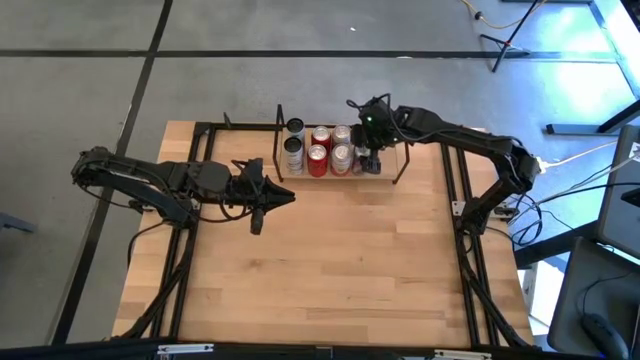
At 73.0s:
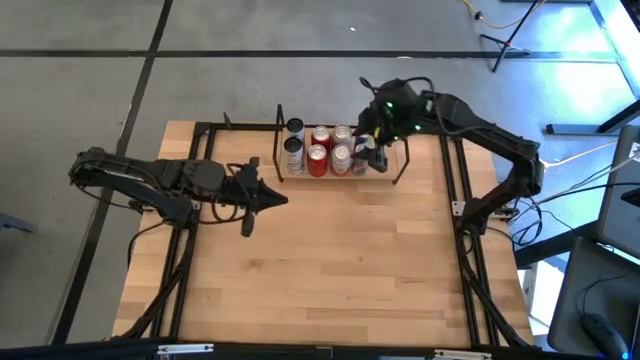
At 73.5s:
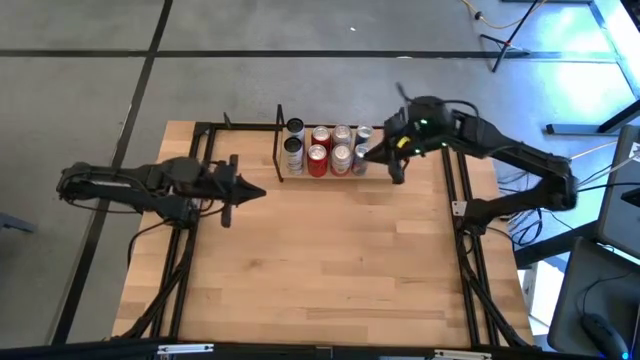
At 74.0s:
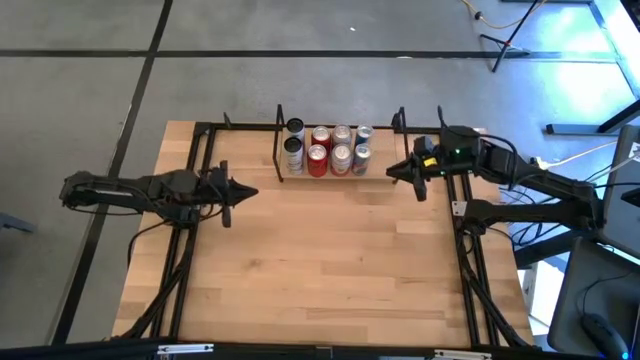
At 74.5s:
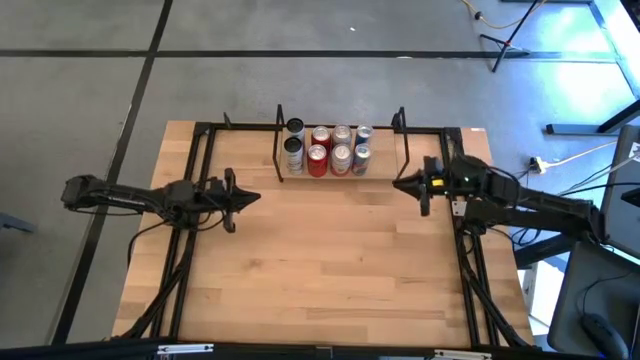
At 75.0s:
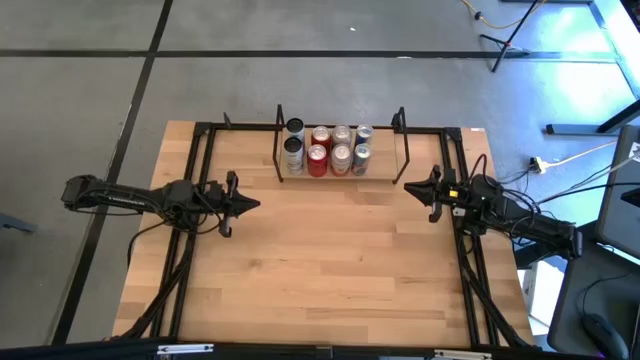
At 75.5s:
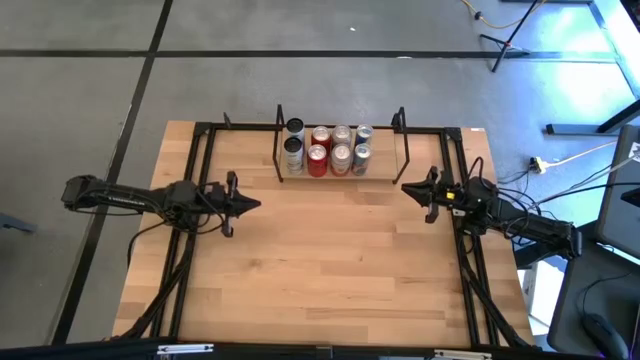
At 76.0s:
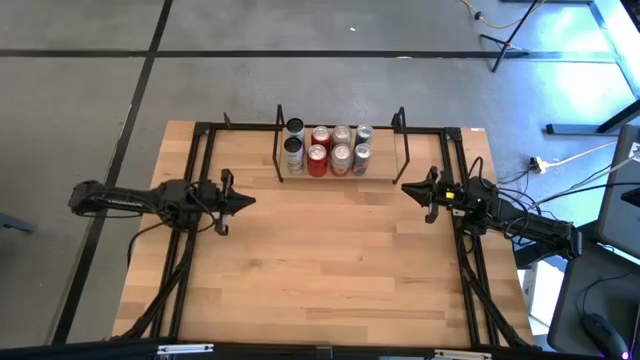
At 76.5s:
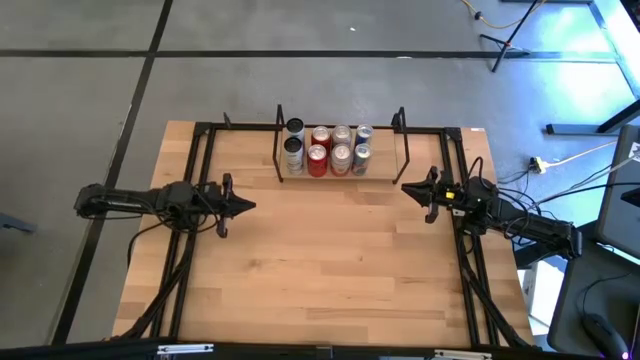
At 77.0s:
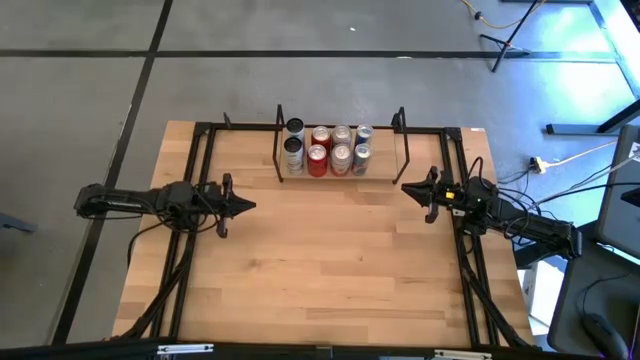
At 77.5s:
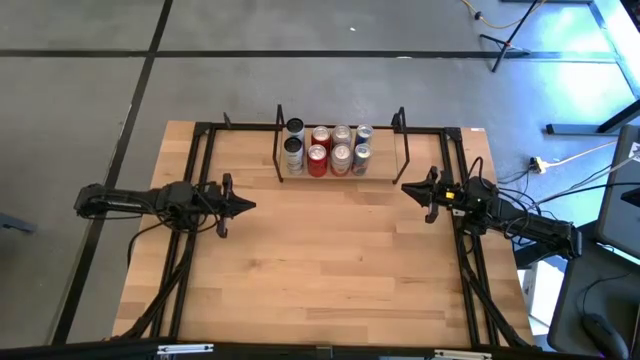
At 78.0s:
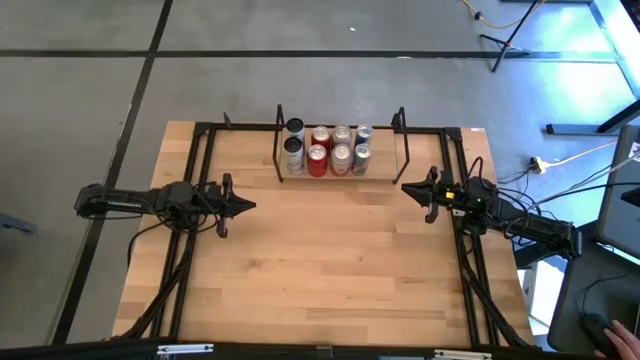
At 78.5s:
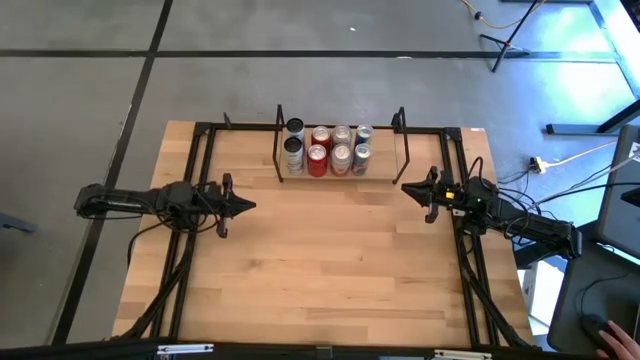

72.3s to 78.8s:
Task: Place canned beverage on shelf
Return to Home Position

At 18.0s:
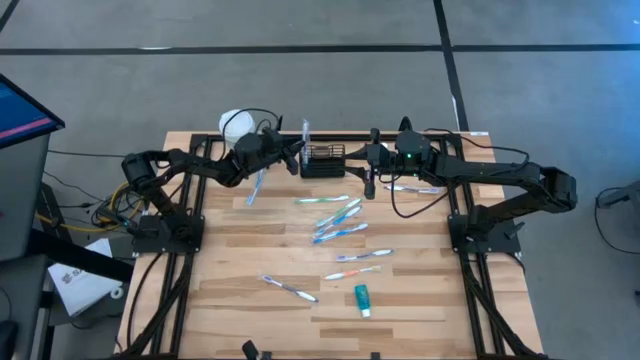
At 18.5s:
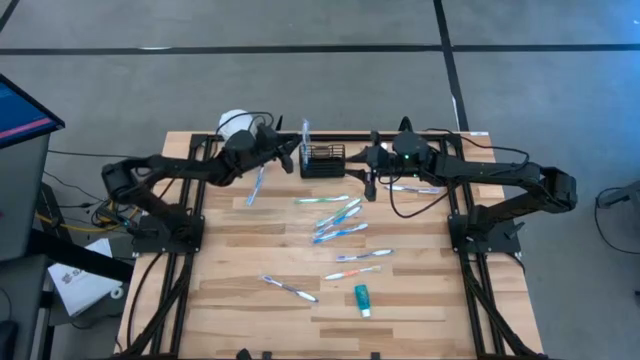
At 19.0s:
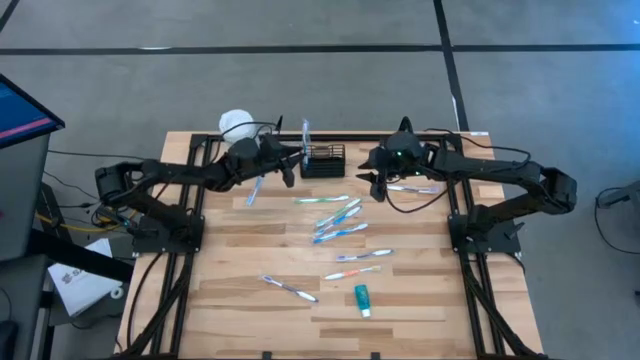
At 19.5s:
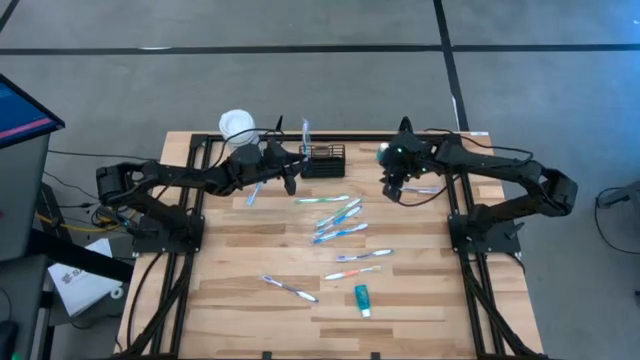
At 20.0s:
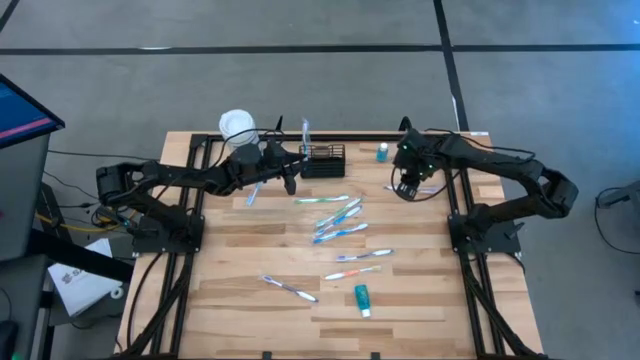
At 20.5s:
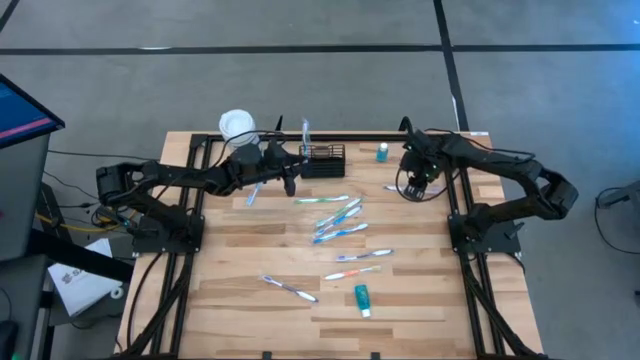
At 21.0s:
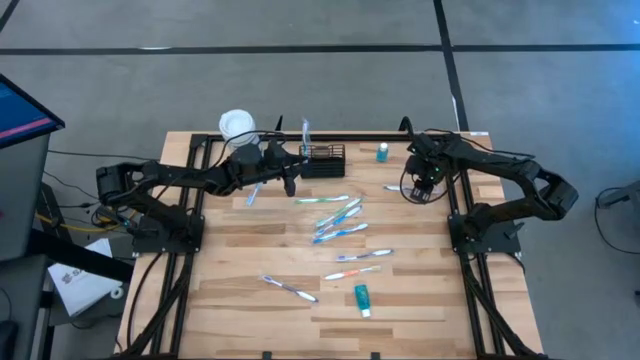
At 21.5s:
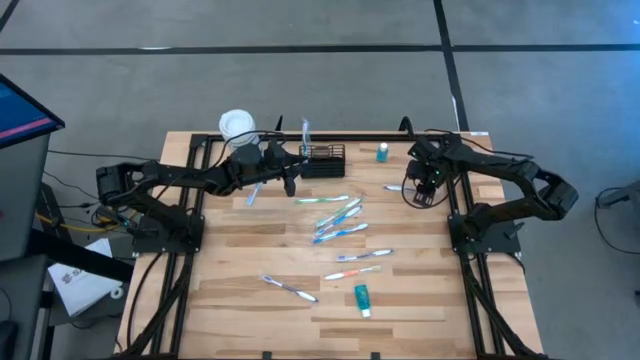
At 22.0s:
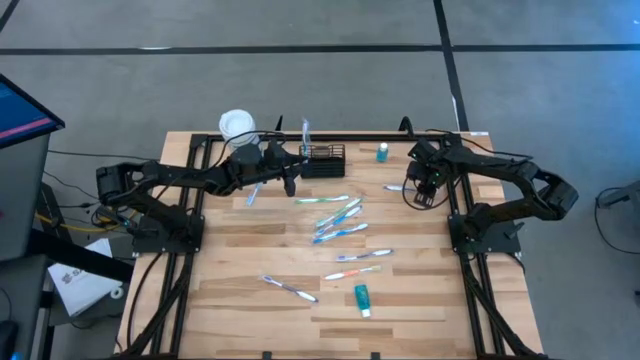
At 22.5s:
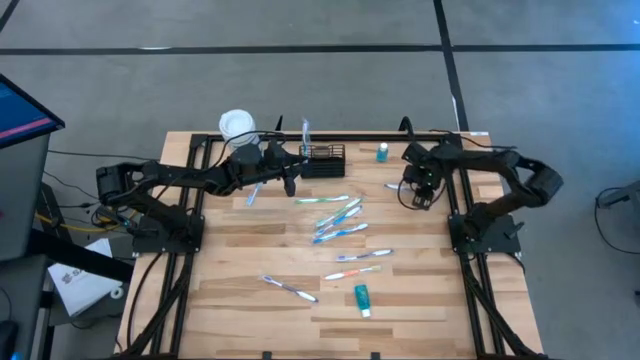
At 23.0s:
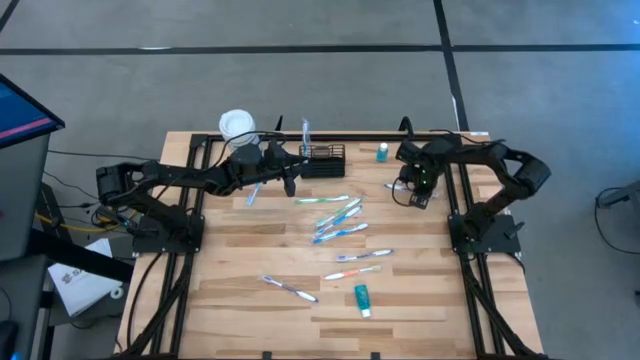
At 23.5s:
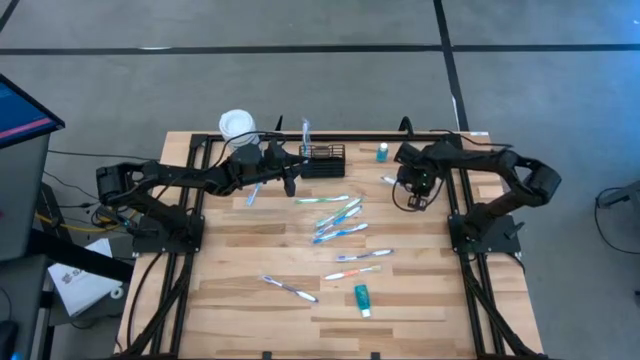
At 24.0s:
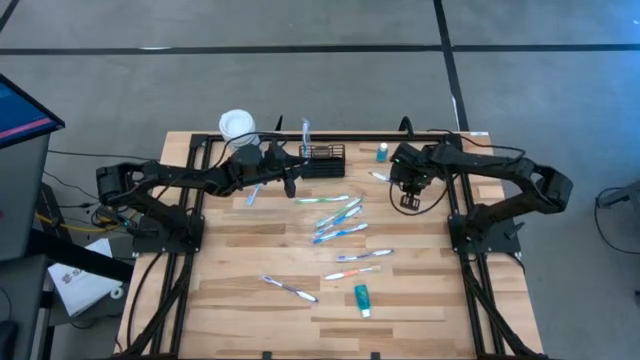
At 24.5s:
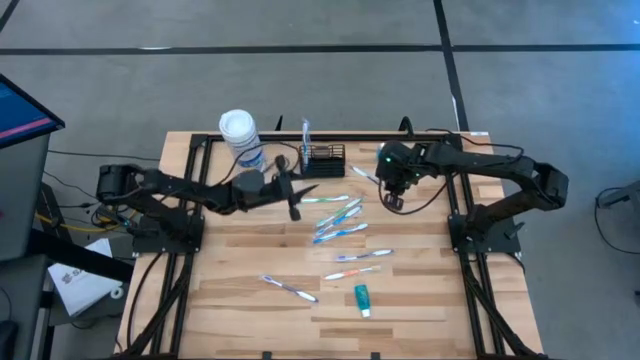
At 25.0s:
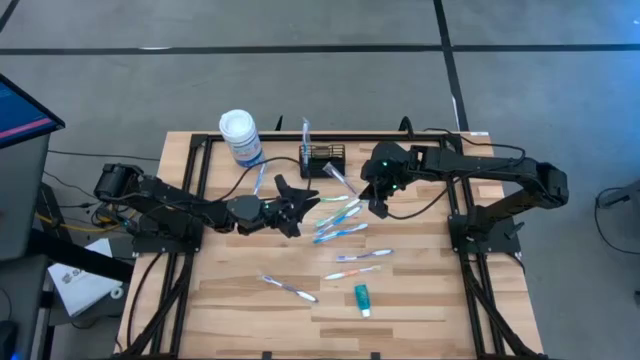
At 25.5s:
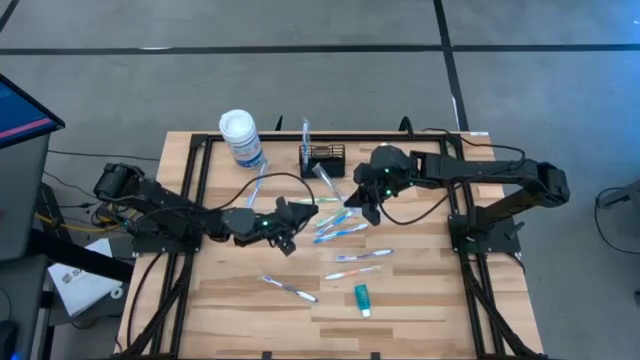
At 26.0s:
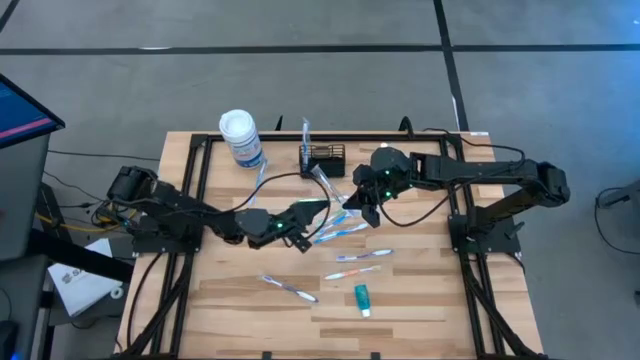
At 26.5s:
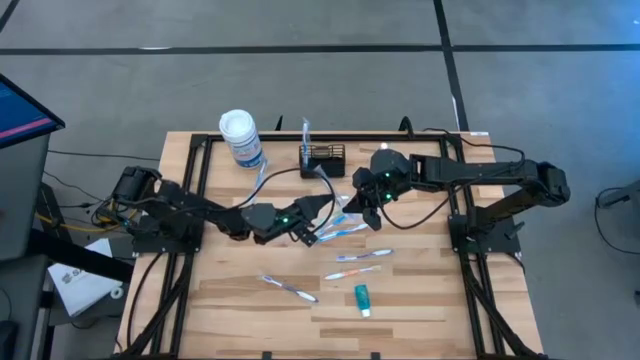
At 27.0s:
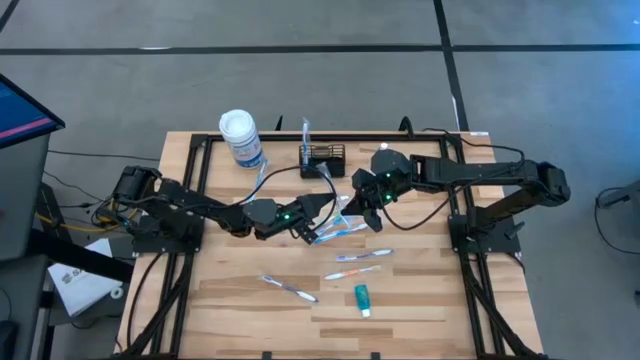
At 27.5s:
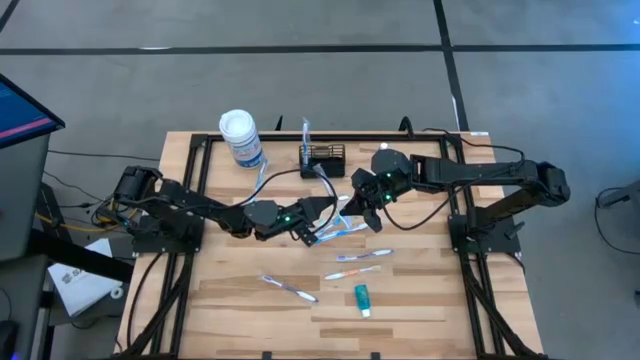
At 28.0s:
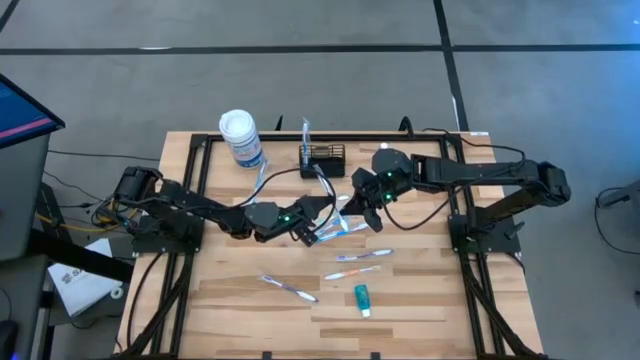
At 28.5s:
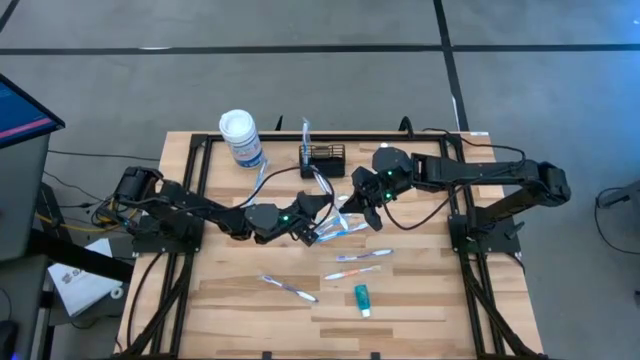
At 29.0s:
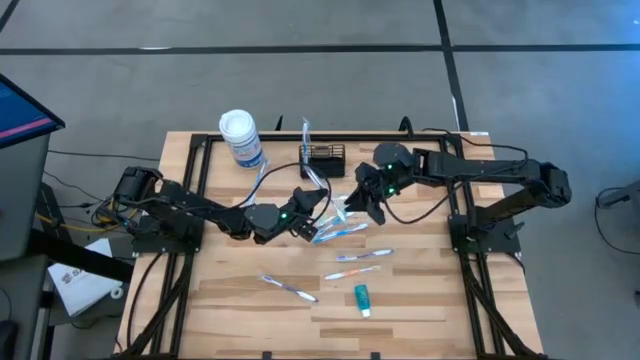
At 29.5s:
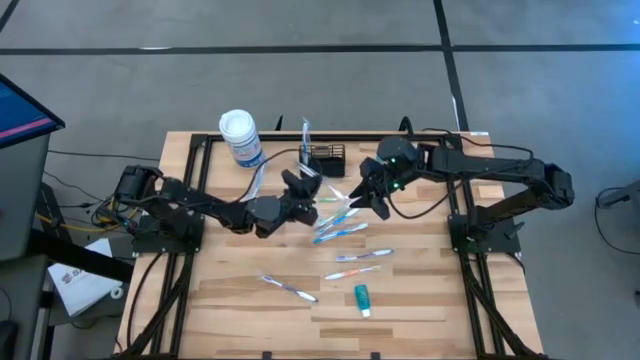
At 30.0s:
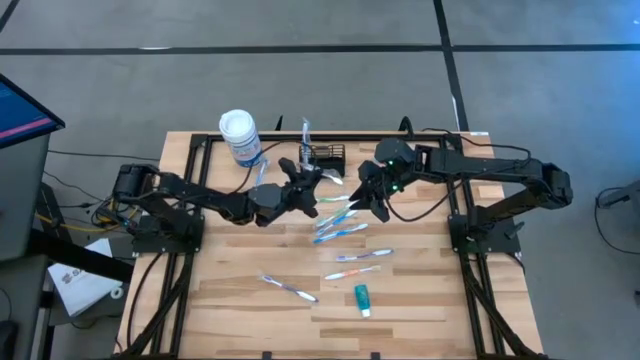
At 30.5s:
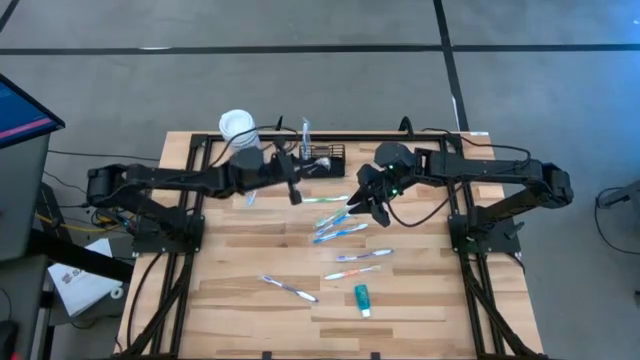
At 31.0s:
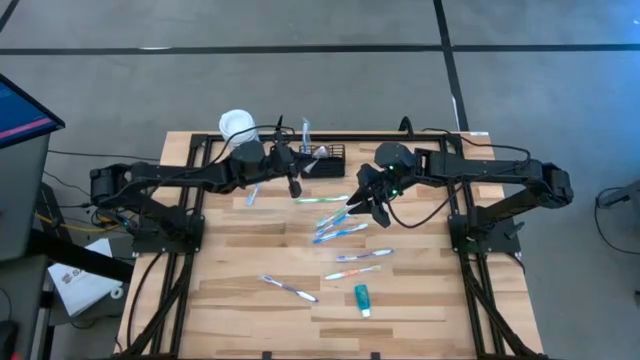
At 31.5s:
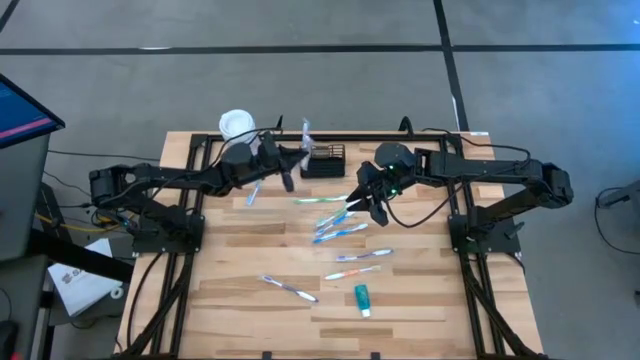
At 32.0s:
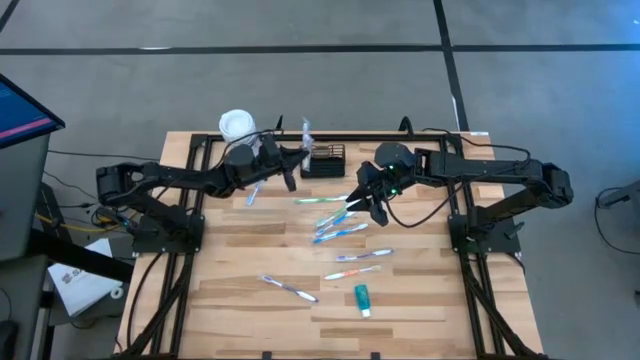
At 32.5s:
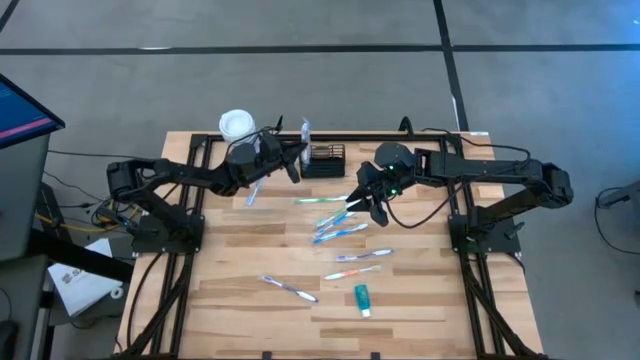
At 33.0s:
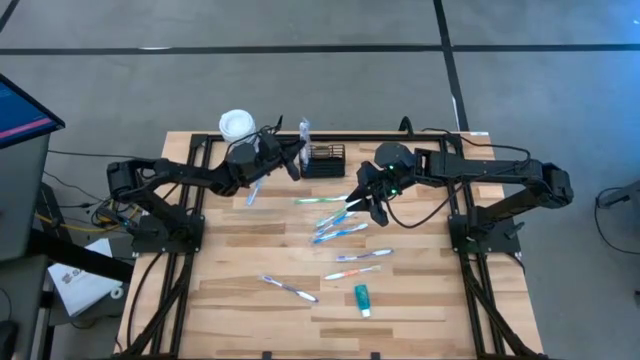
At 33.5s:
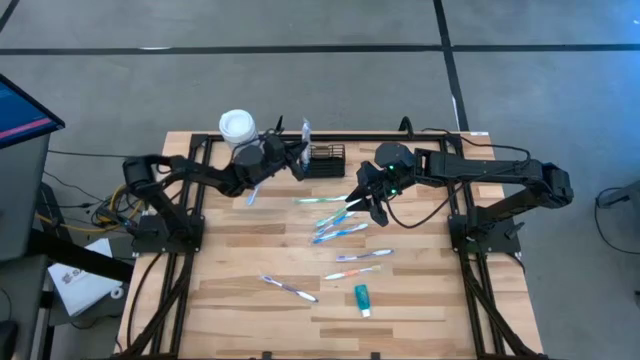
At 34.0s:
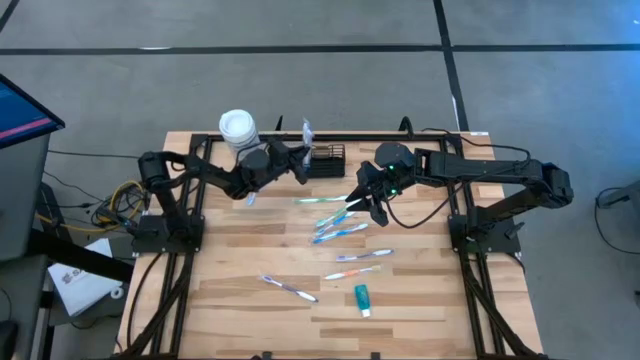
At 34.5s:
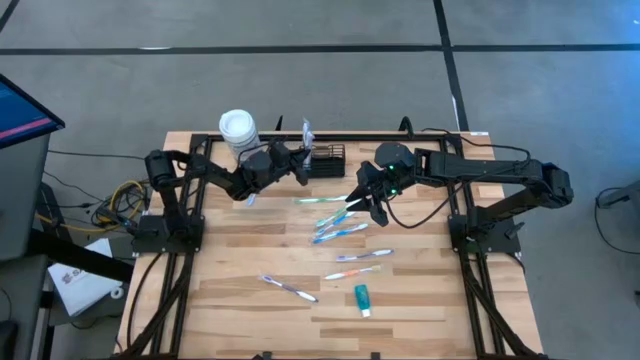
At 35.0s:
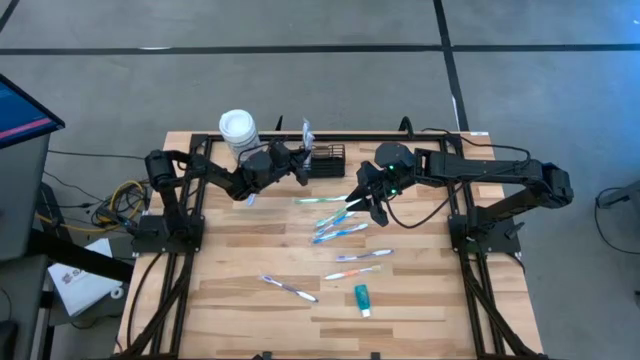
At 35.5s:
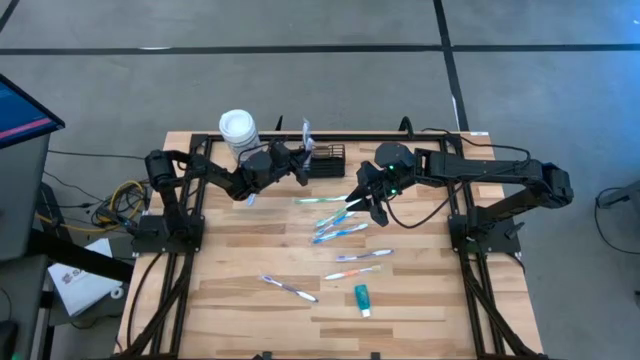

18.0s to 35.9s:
Task: Pick & Place toothbrushing station
Put the top right purple toothbrush into the black wire organizer
